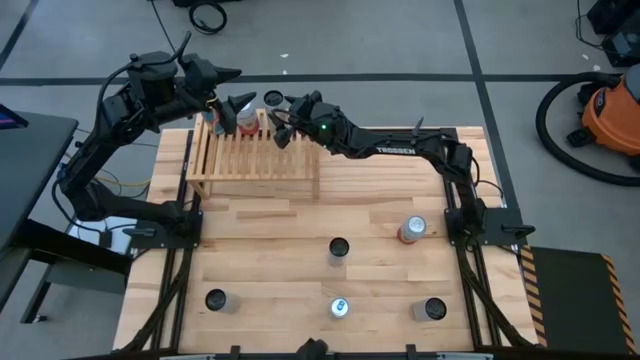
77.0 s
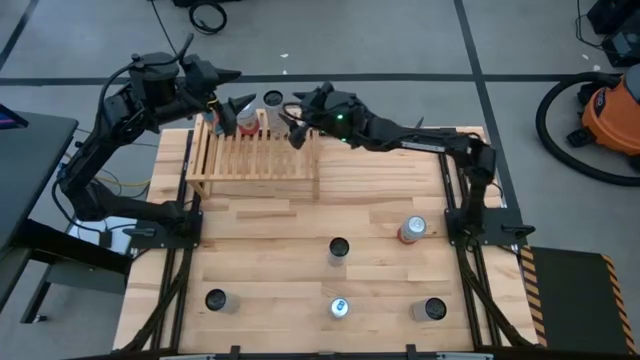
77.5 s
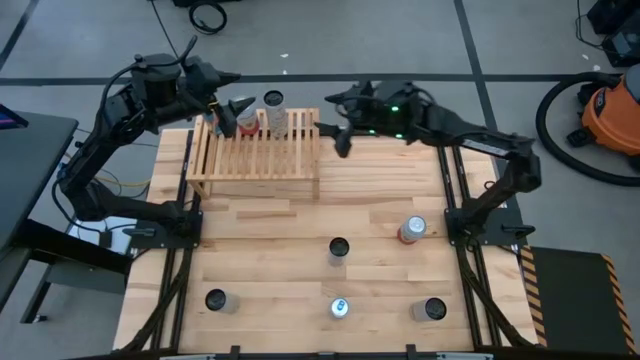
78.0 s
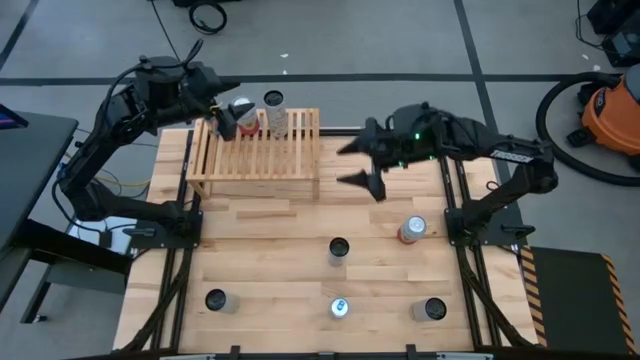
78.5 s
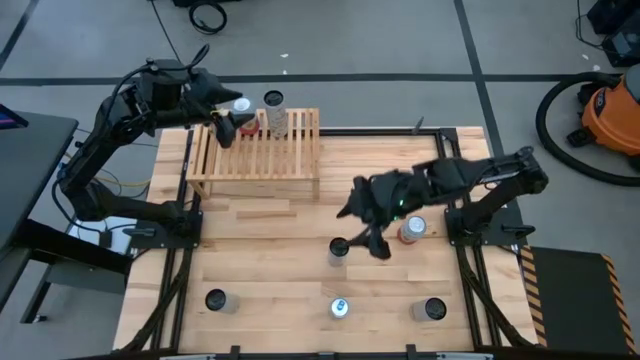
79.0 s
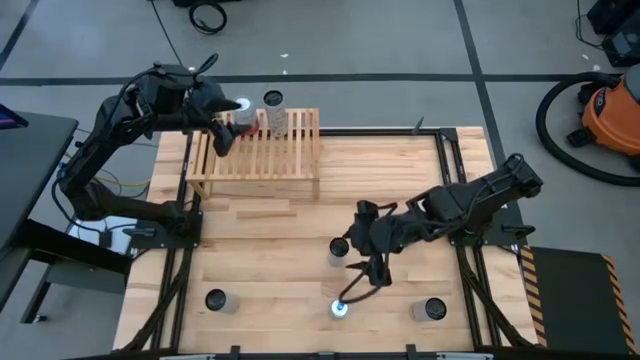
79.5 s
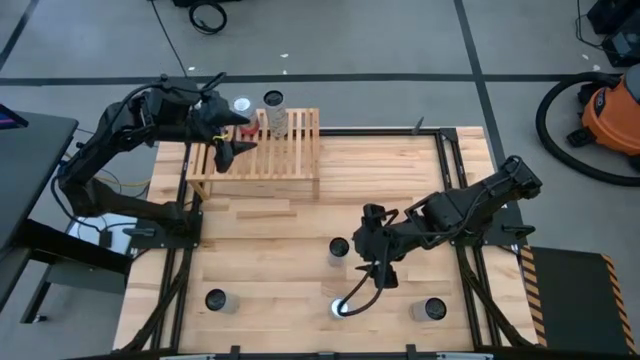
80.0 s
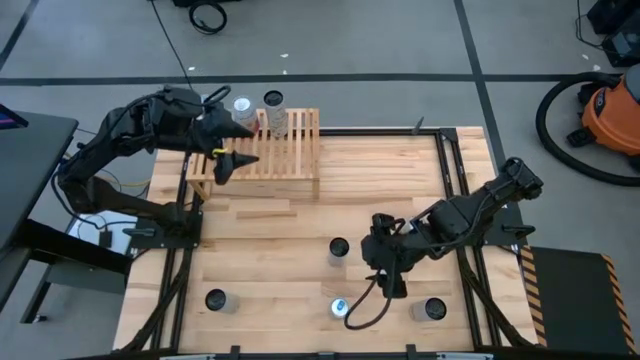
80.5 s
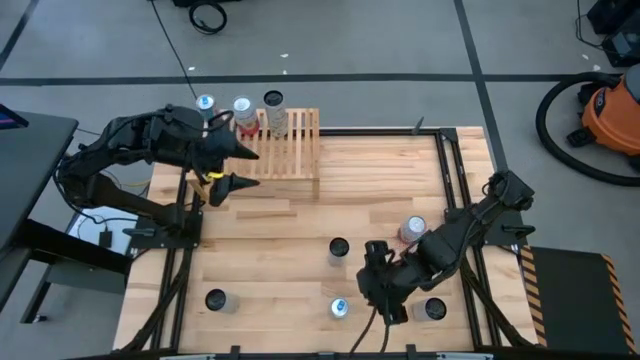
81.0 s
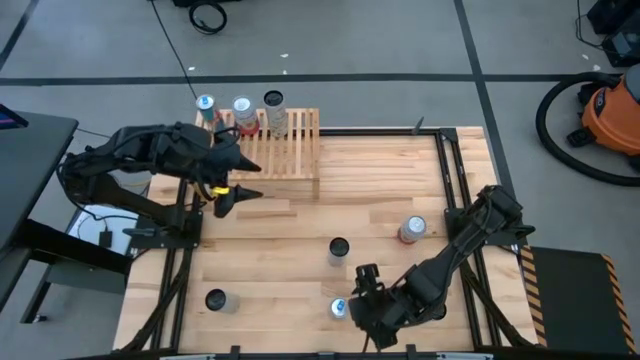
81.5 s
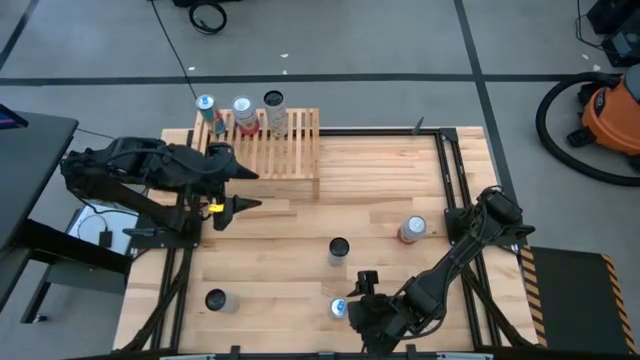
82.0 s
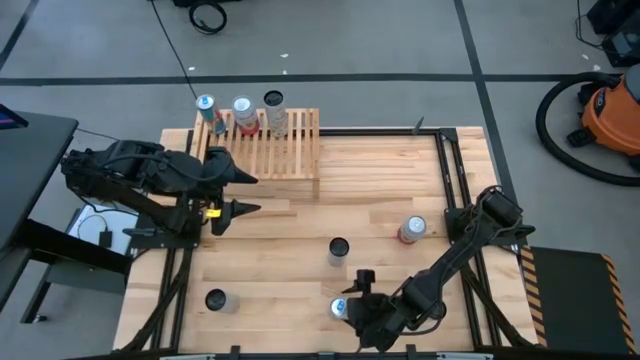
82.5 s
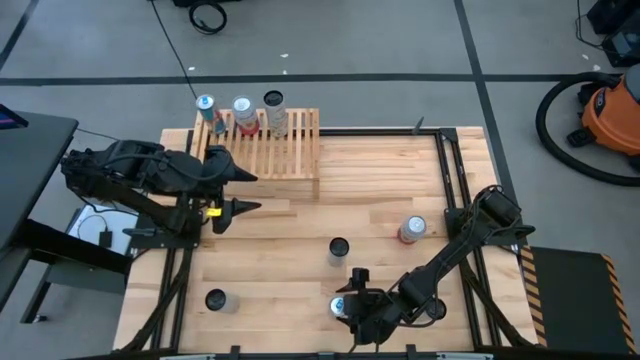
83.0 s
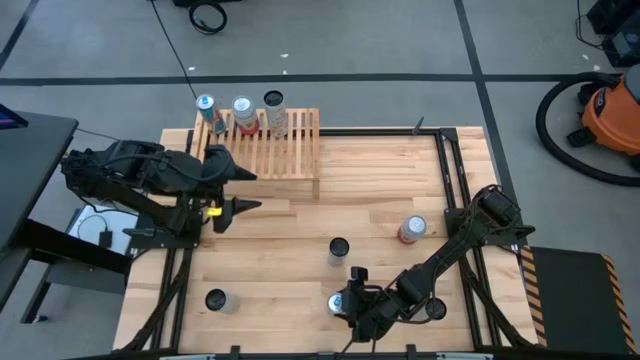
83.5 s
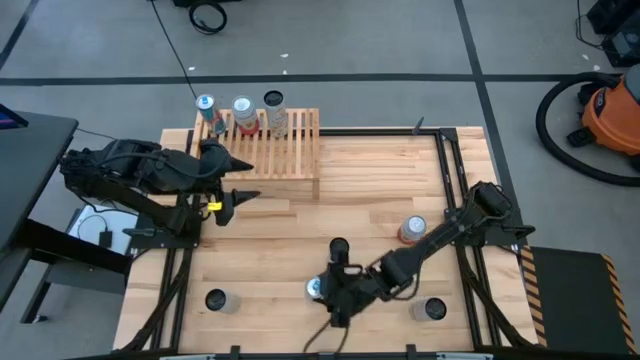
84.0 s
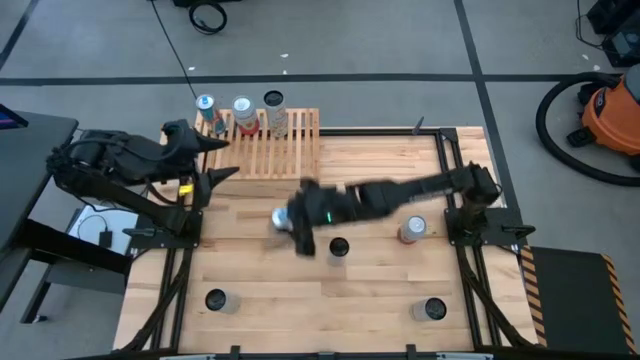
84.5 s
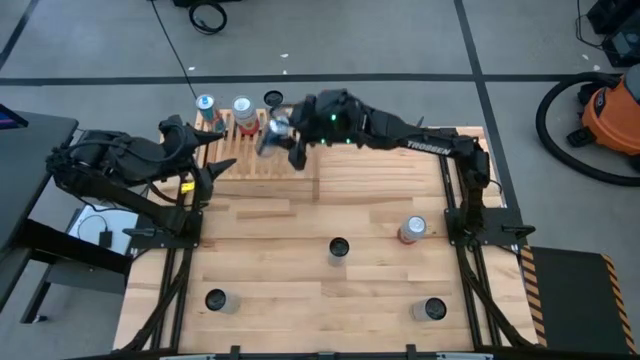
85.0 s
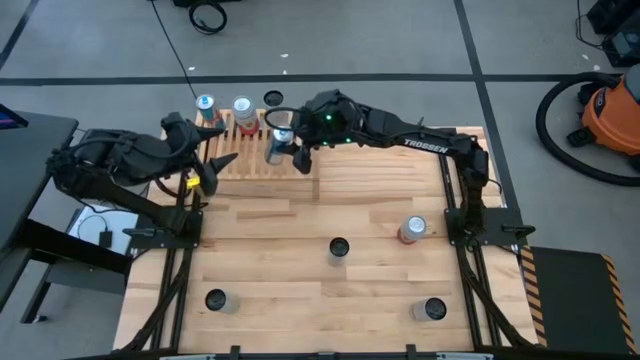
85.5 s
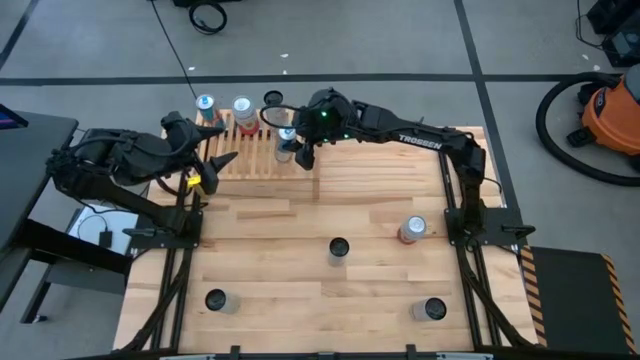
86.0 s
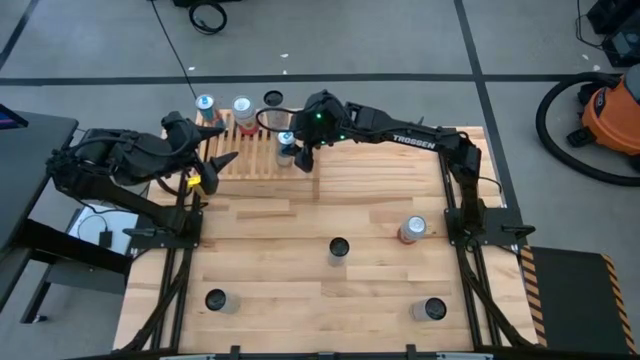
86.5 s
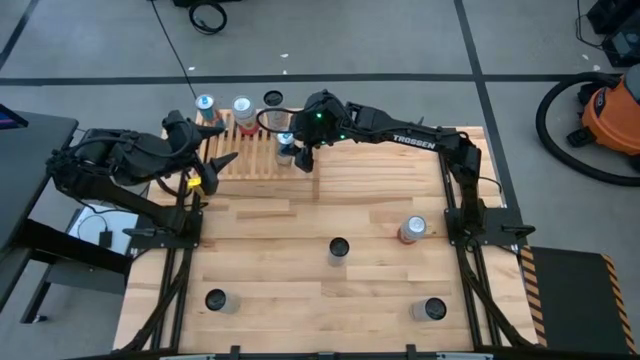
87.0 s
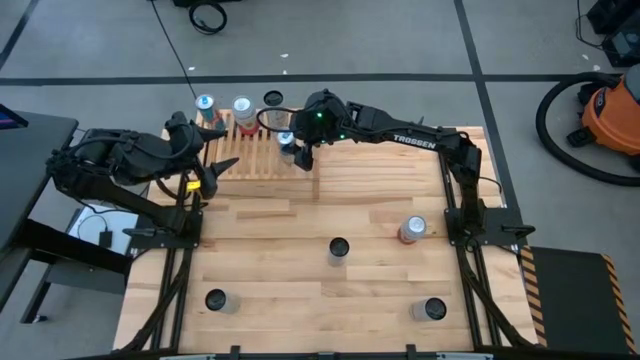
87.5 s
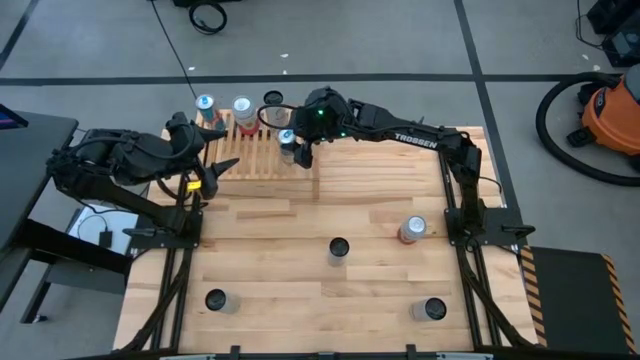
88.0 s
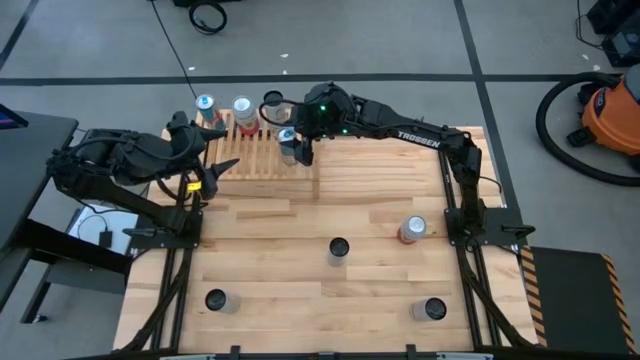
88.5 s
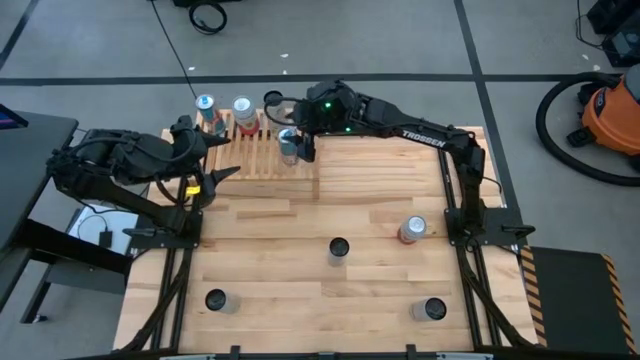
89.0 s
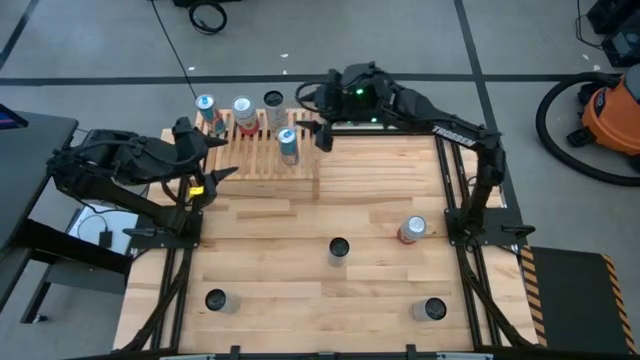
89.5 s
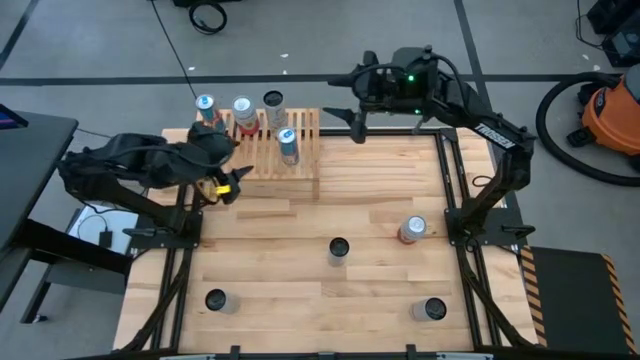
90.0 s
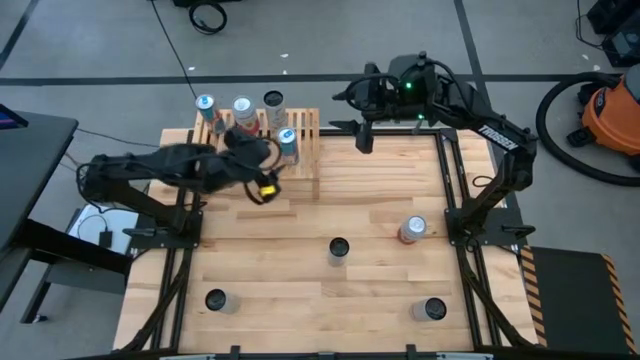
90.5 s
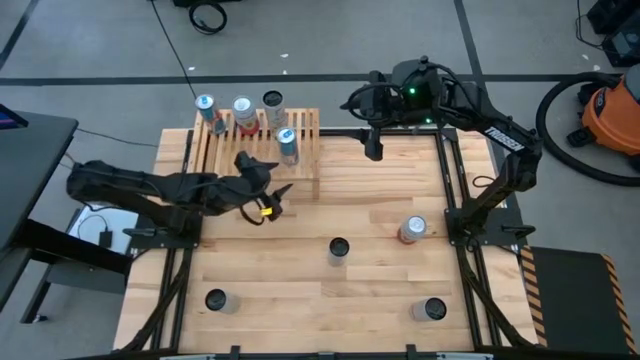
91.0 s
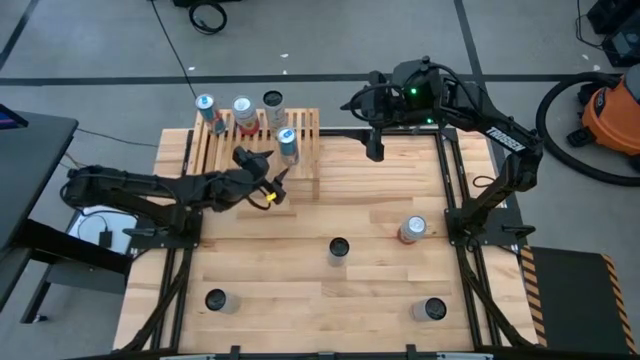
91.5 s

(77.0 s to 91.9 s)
Task: Place canned beverage on shelf
Put the blue soda can on the shelf aligned with the other blue soda can

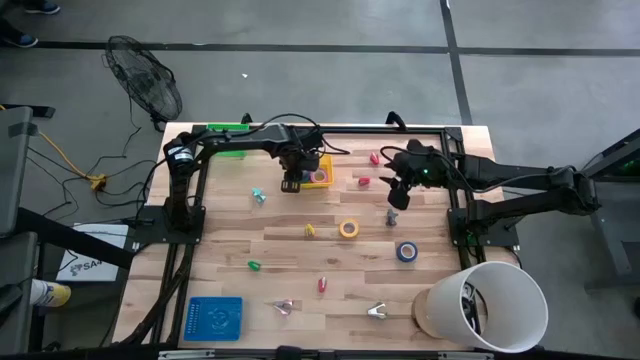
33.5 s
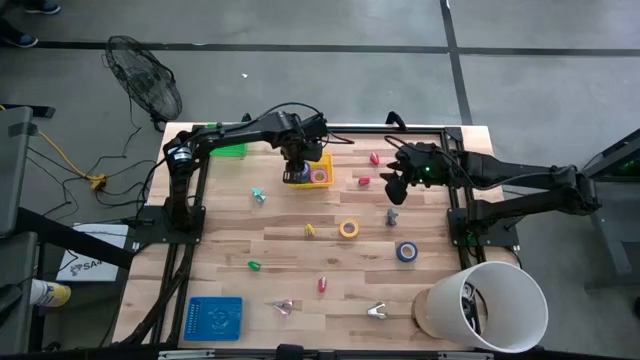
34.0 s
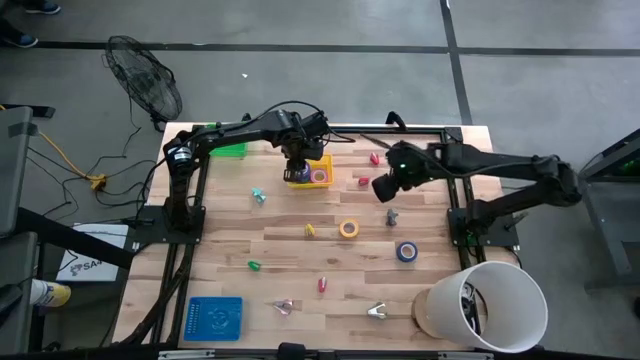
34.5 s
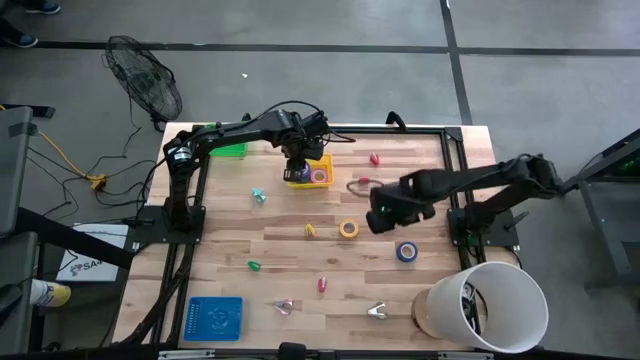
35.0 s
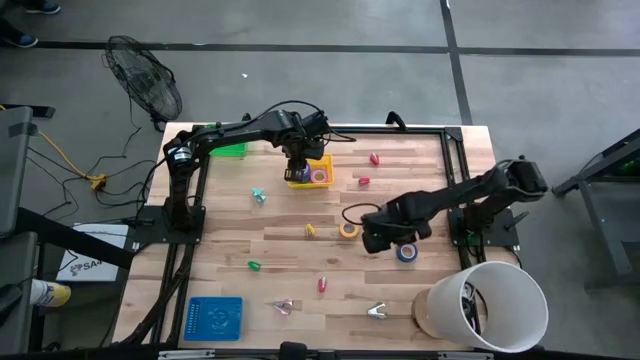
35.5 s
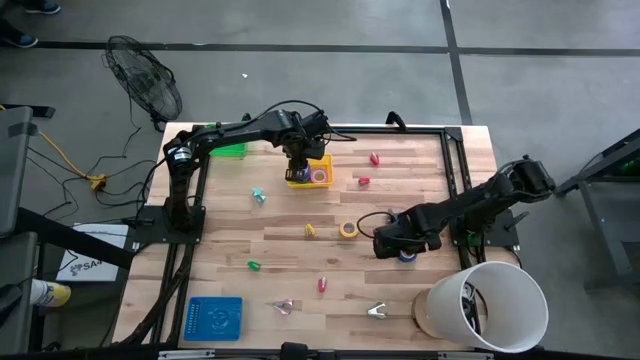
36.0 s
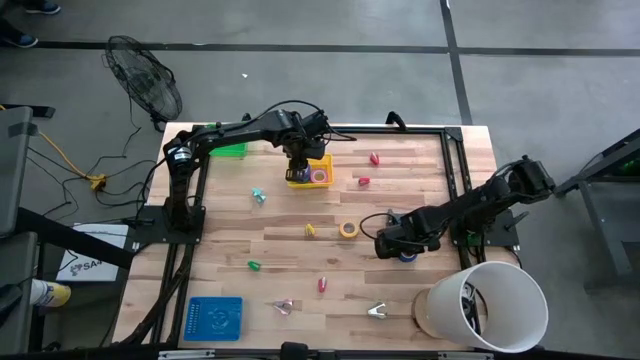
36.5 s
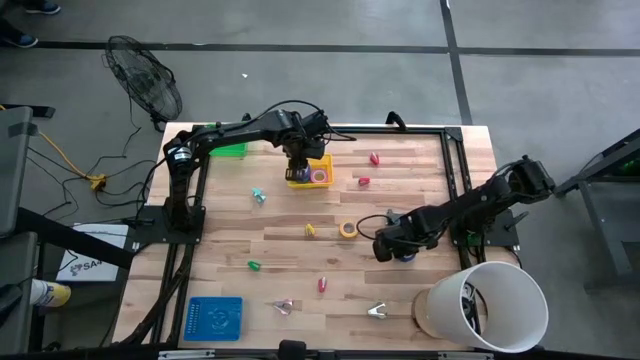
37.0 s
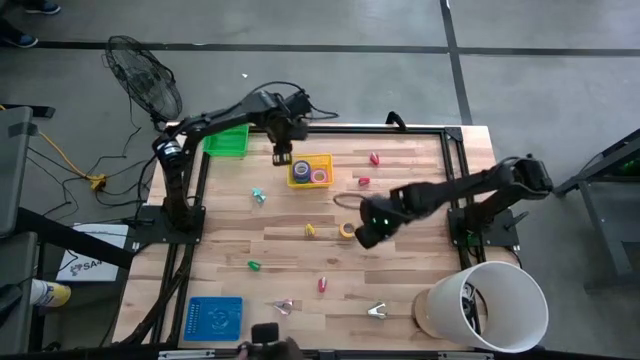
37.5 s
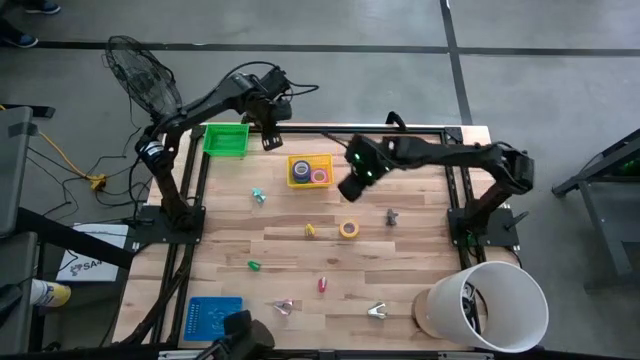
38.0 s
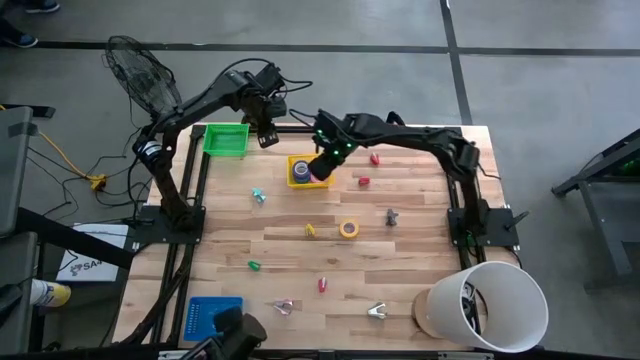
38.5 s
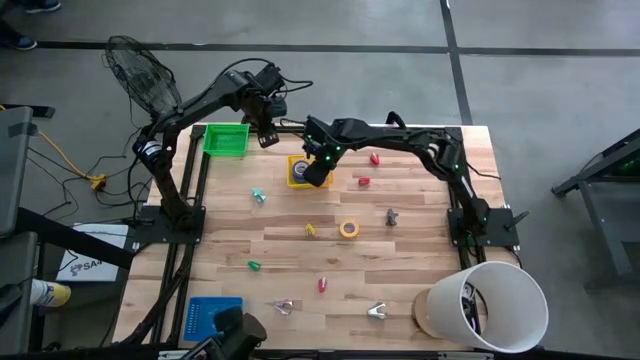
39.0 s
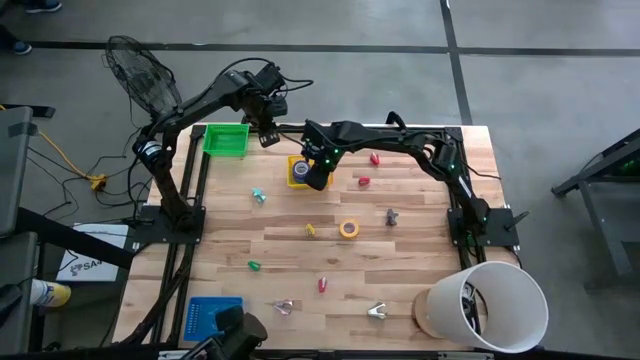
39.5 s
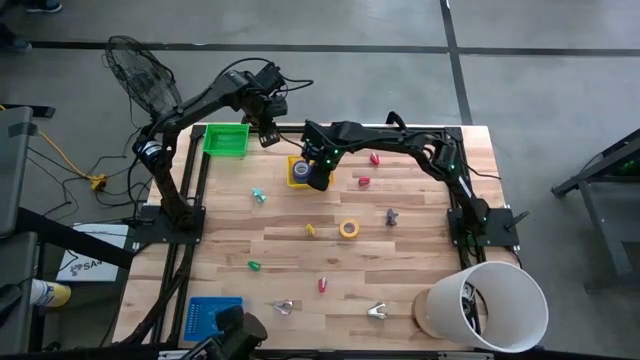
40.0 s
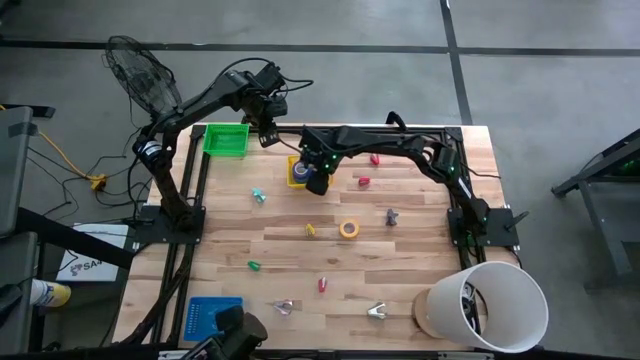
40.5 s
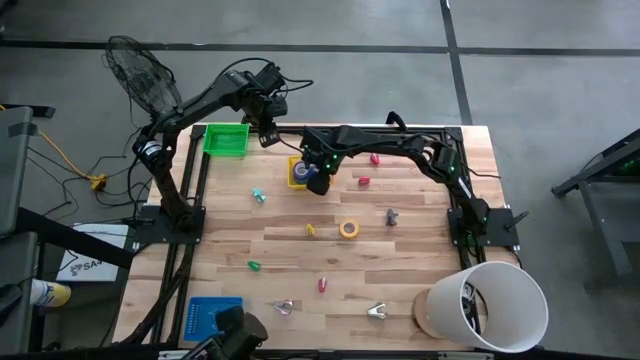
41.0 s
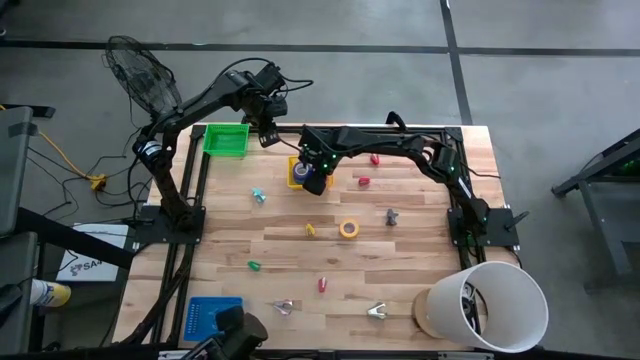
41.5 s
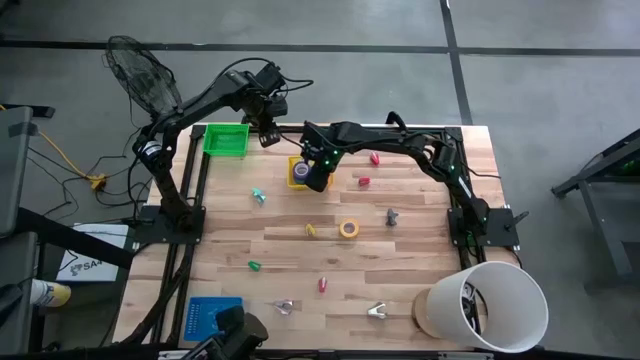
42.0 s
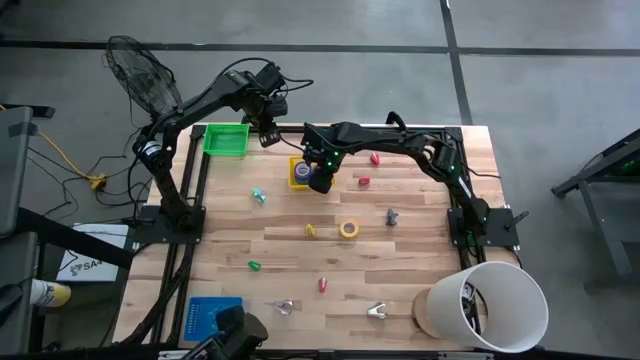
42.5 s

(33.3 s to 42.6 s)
Task: Pick and place Stapler, Stapler remover, tape
Put the dark blue tape into the yellow bin
